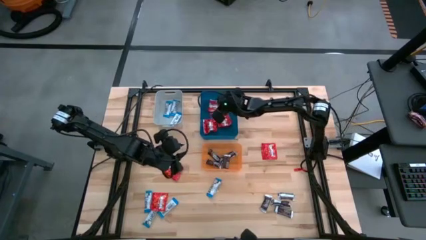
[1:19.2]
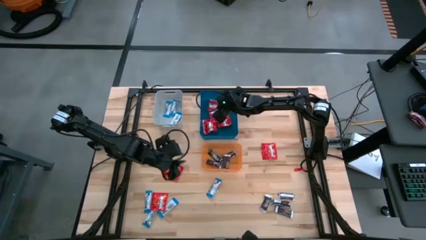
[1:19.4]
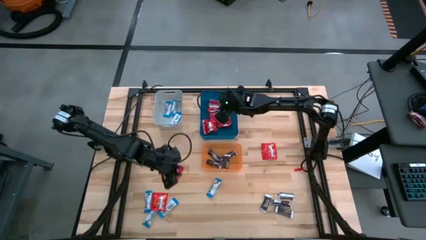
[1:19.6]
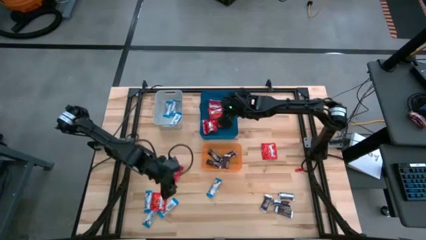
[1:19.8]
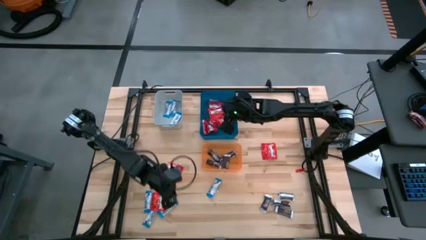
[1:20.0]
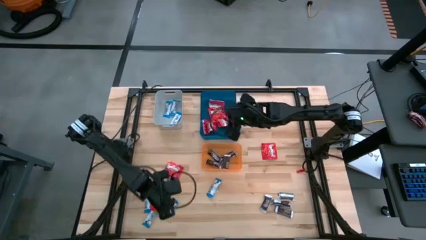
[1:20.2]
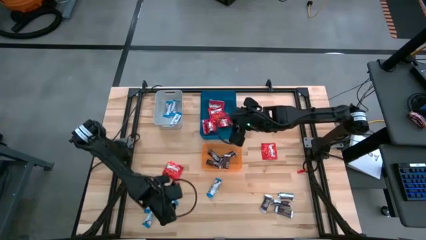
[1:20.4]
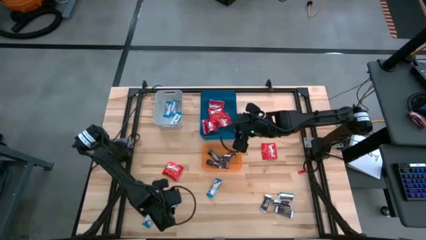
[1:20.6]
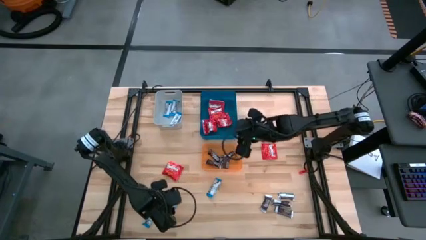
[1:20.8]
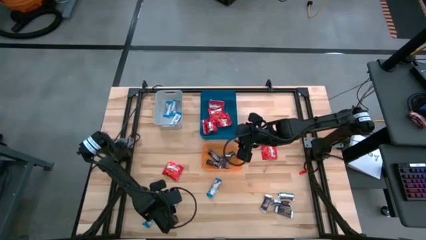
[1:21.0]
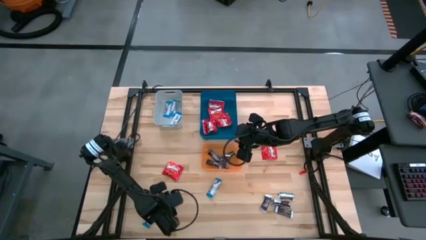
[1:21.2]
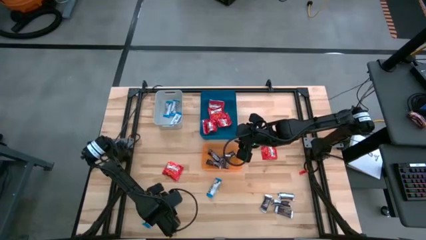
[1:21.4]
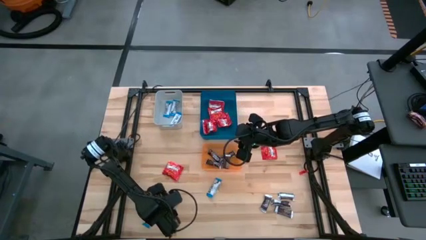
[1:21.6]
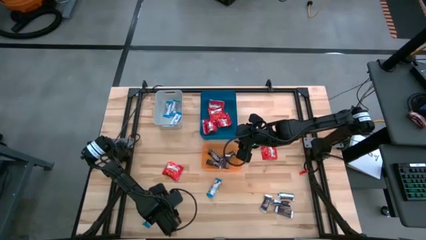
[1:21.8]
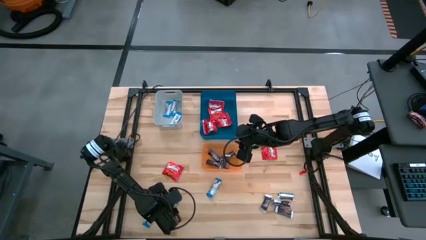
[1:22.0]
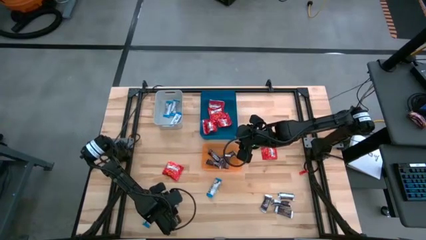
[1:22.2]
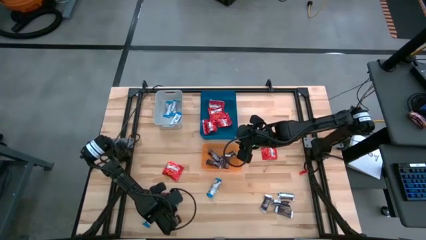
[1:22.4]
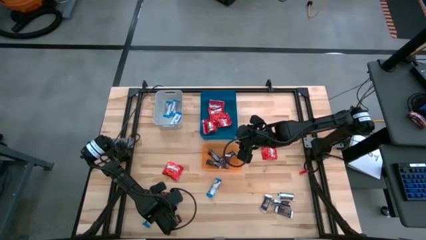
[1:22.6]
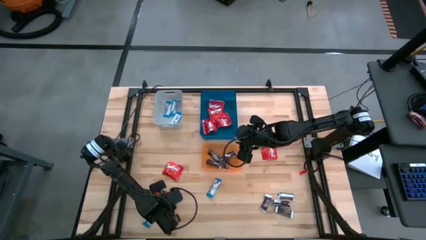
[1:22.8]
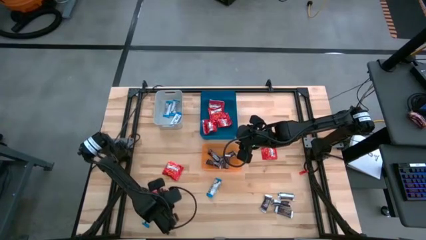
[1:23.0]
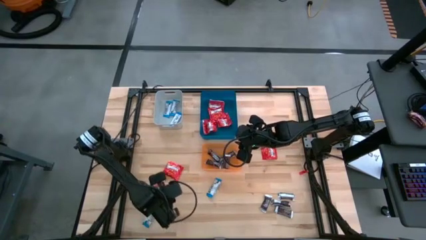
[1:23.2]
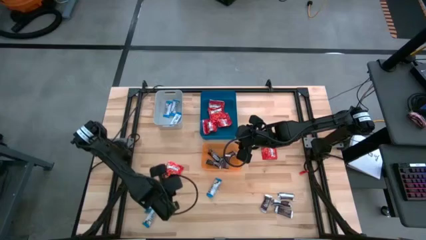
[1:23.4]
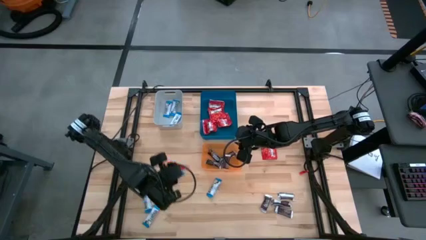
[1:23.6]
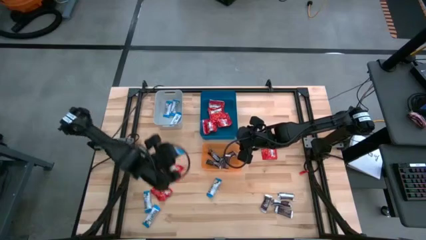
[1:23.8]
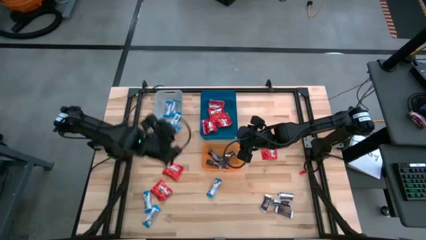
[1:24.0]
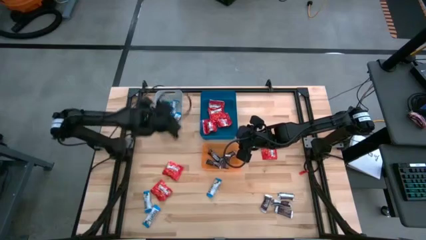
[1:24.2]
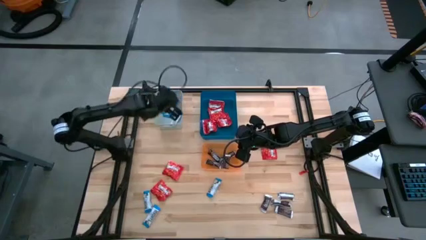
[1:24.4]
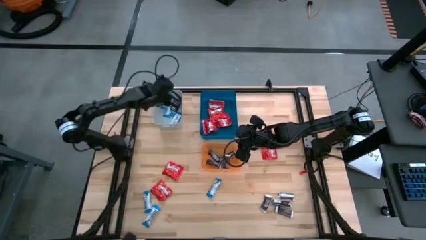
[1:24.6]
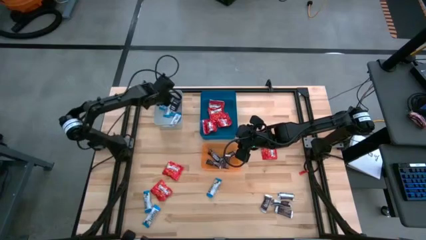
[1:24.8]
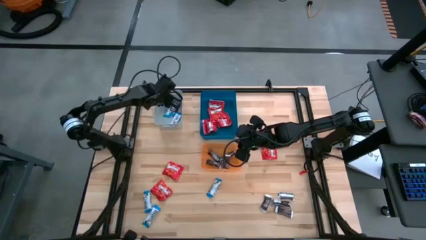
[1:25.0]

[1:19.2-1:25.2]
Task: Sort candy
Put the blue chocolate bar into the gray bin

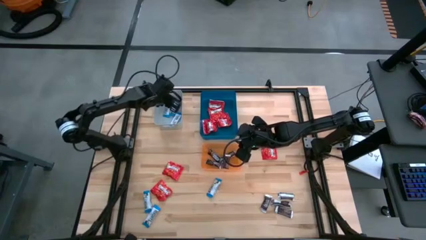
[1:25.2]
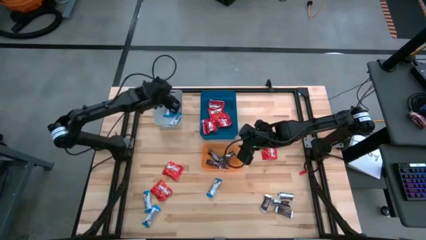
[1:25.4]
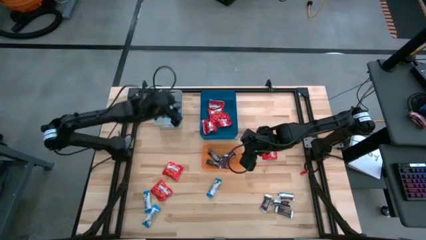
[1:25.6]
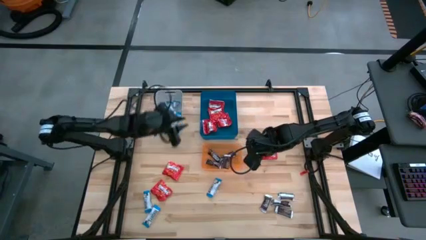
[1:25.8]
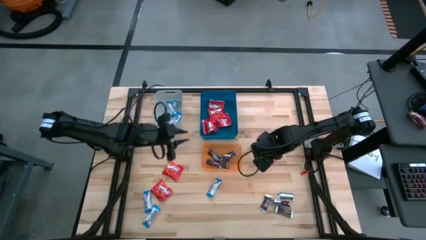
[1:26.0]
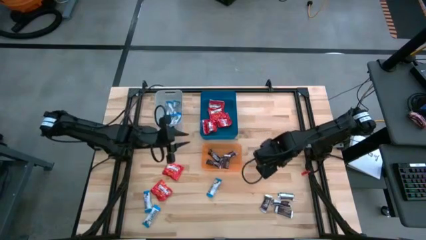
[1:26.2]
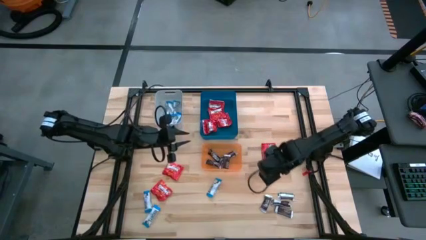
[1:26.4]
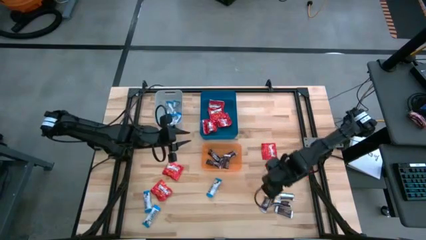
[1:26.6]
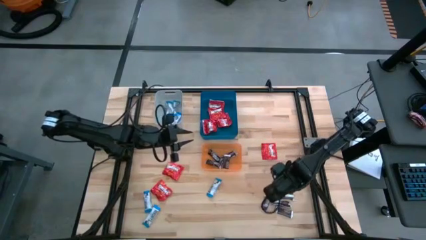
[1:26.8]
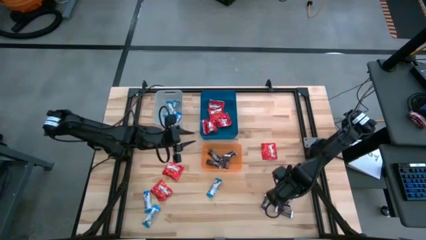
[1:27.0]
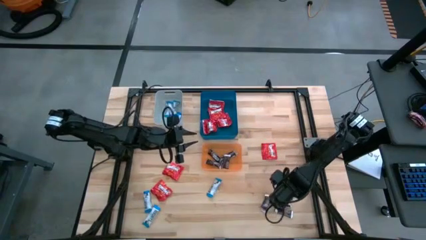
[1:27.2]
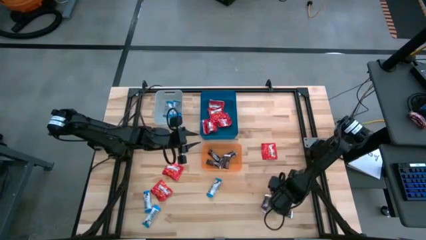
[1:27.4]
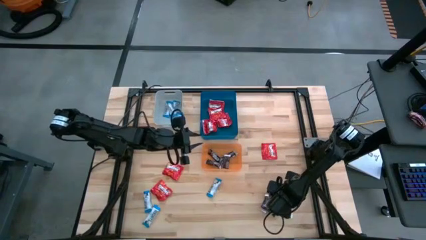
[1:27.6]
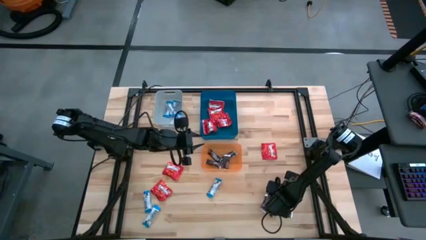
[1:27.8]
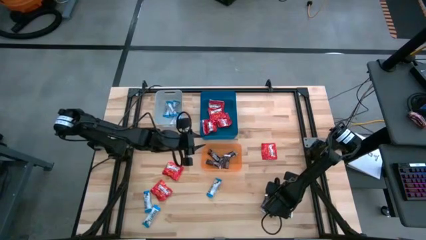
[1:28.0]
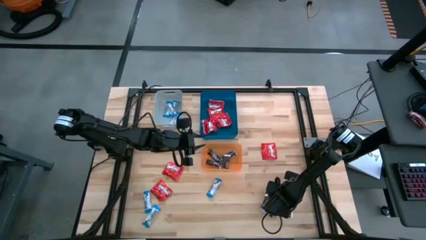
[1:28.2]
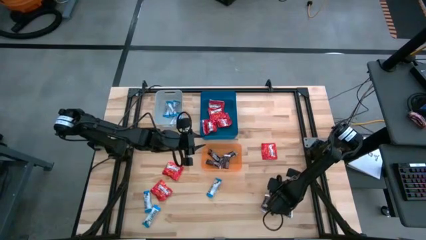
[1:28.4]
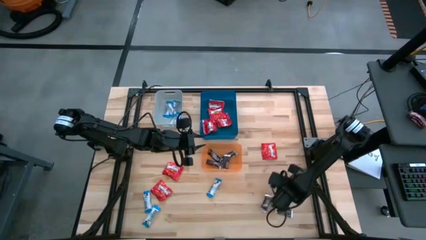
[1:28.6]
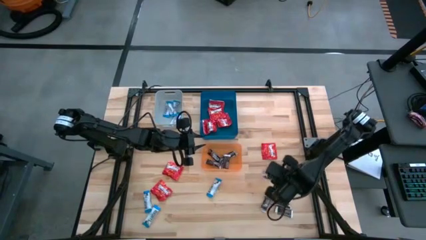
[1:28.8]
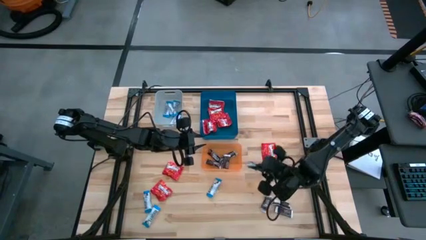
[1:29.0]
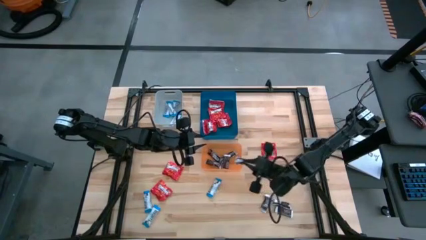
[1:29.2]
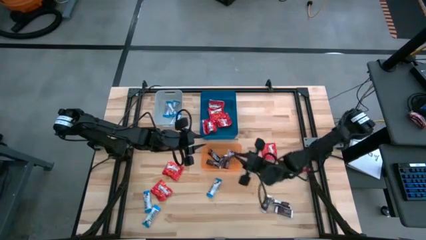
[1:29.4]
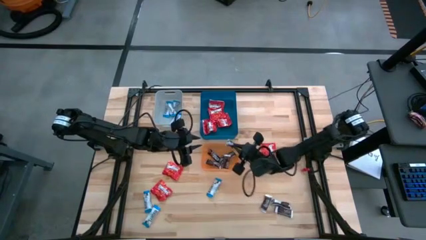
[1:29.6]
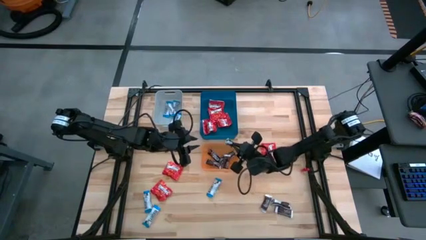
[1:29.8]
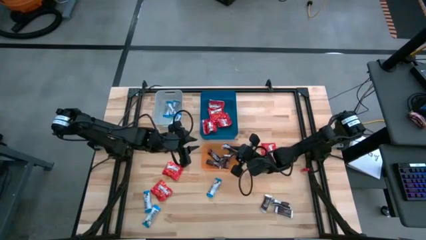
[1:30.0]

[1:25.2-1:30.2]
Put the brown chocolate bar into the orange bin

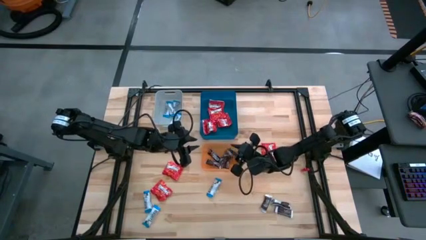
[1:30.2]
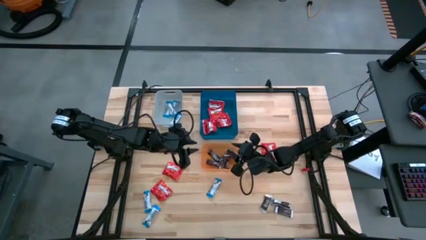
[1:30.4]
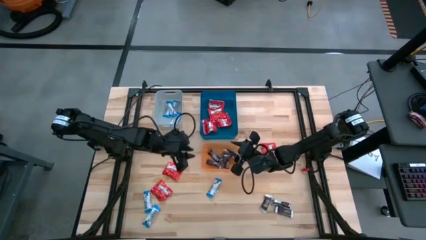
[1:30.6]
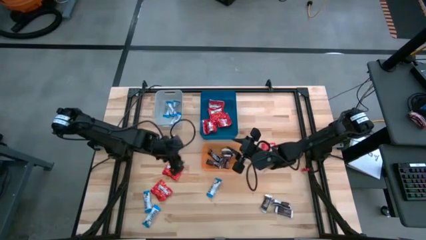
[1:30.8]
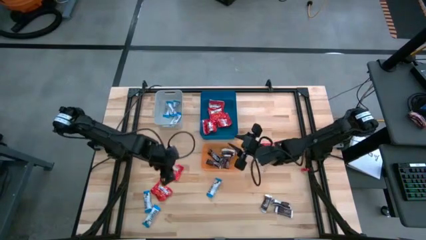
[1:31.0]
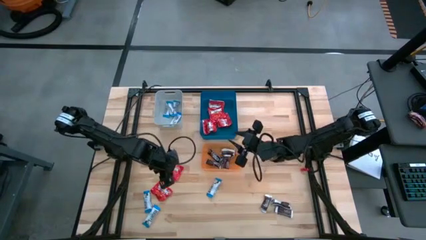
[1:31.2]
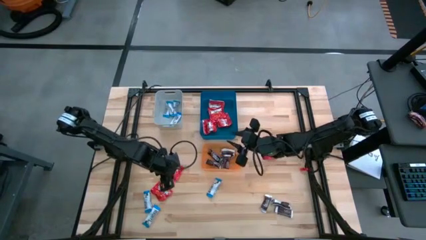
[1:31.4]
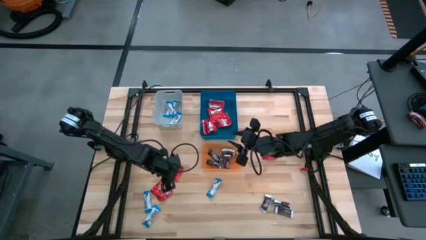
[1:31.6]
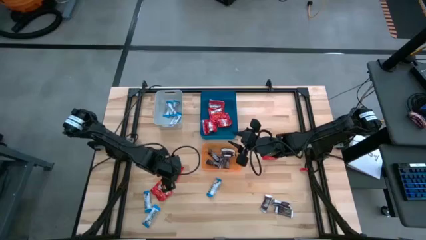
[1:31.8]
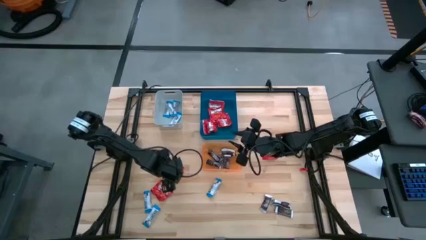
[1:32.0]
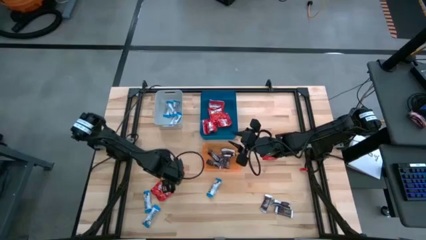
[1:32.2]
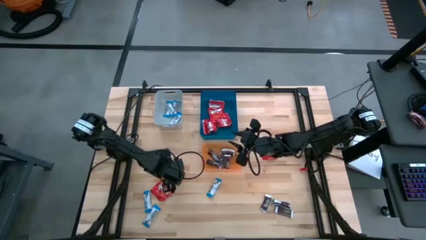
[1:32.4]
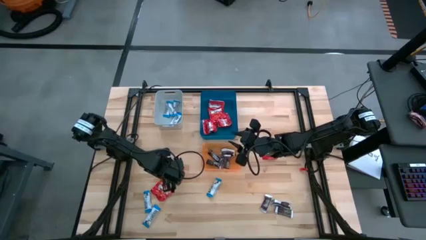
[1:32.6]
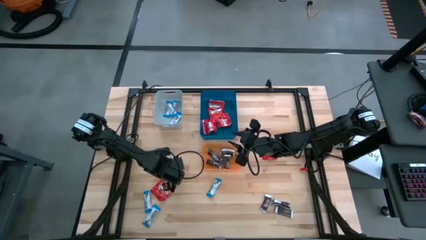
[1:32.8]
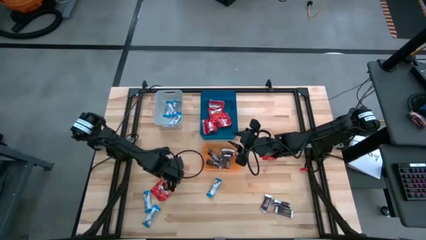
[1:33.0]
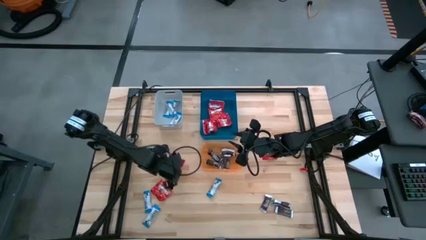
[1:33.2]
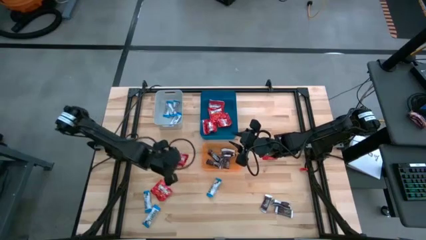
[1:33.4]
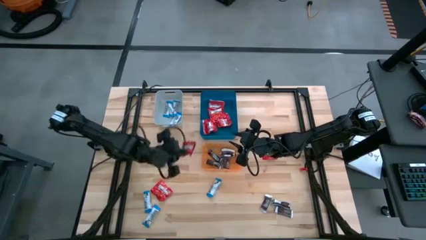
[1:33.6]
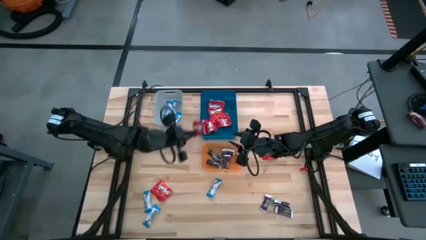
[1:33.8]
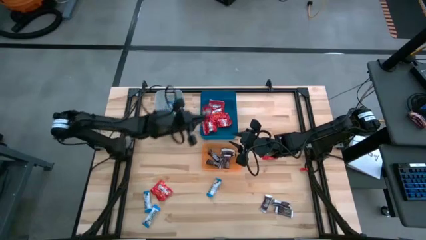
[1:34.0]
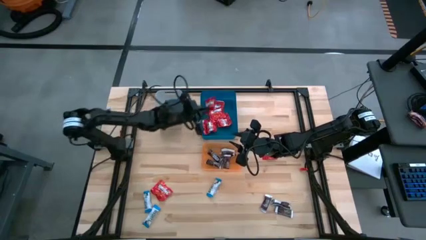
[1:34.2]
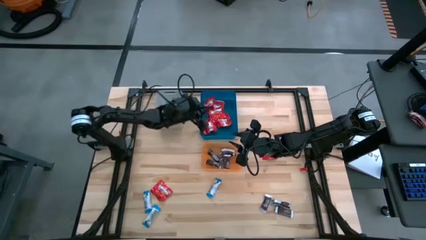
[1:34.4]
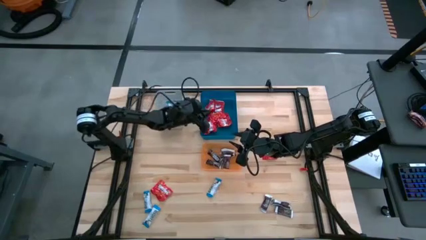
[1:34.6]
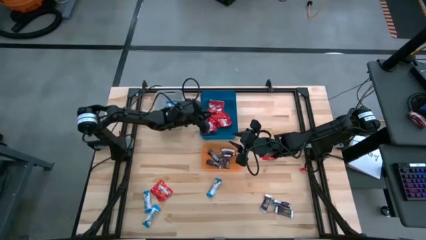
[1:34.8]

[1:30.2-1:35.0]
Put the red candy into the blue bin
